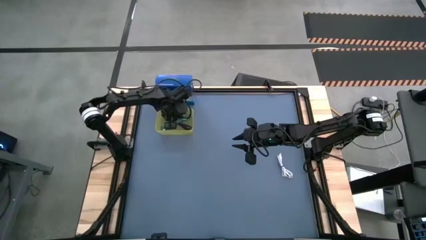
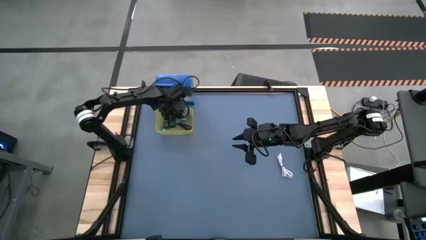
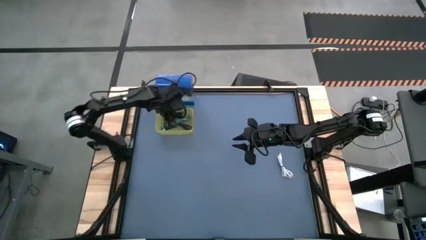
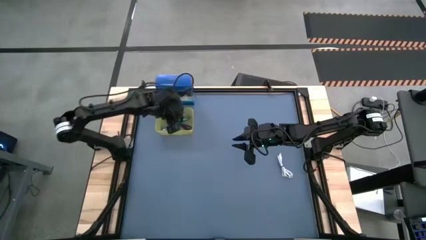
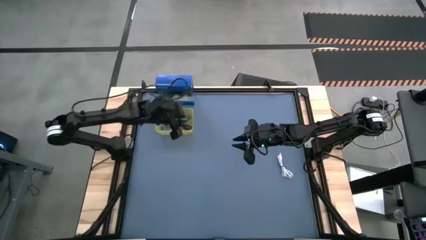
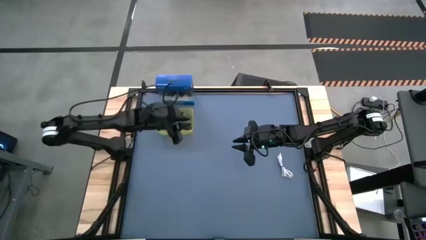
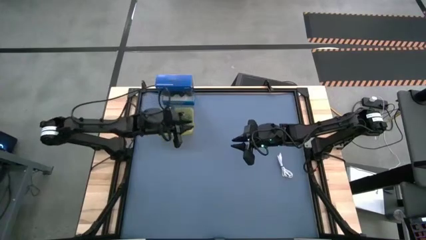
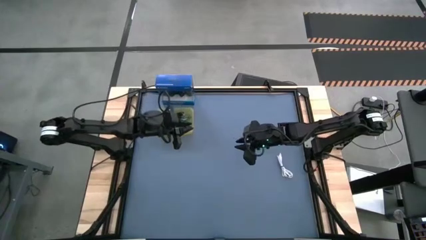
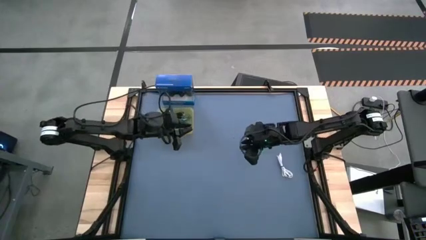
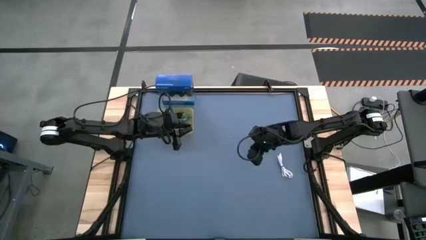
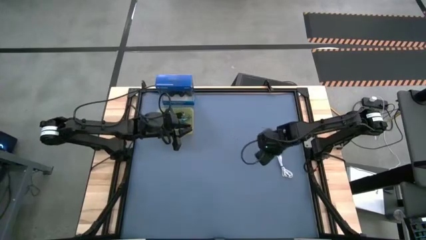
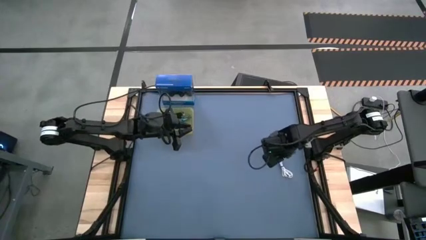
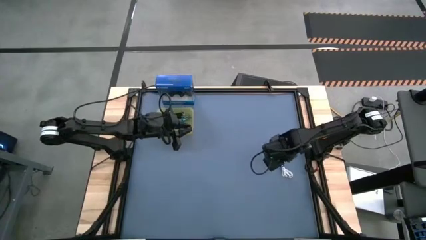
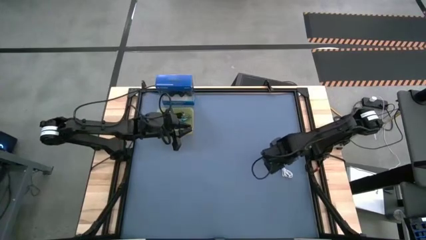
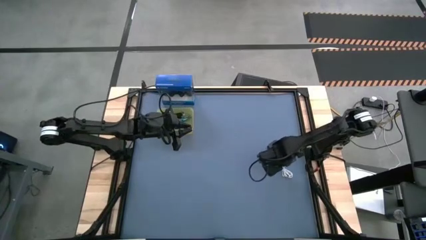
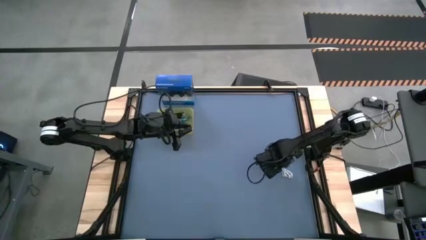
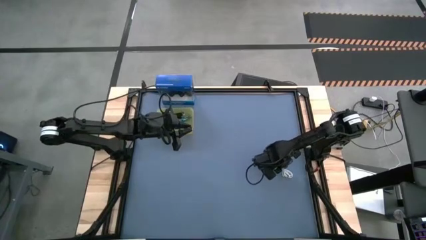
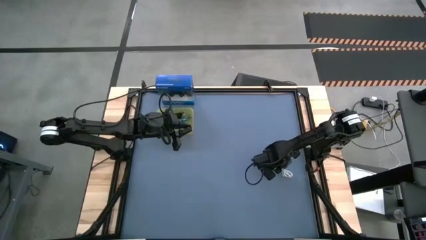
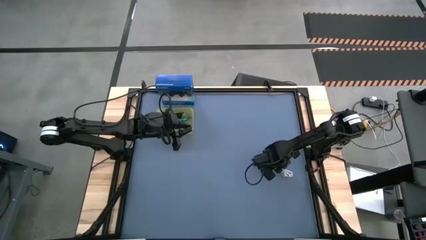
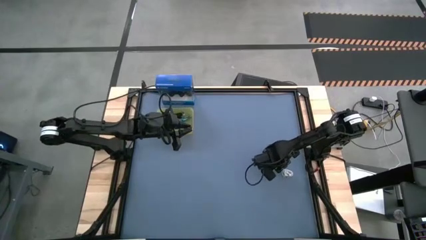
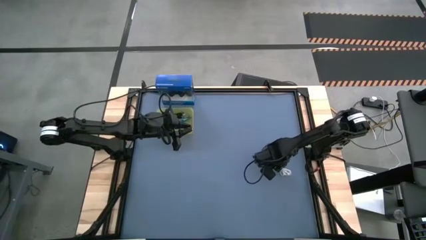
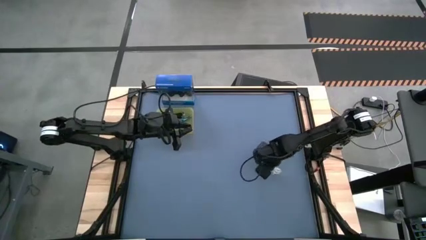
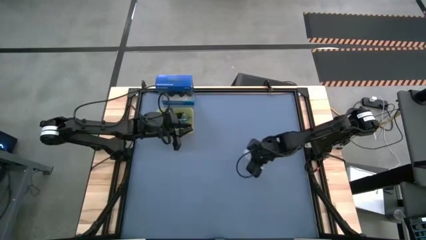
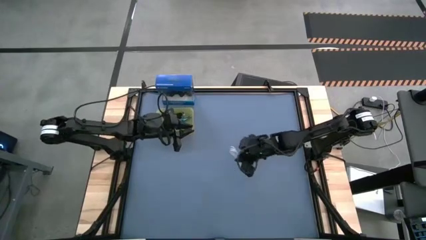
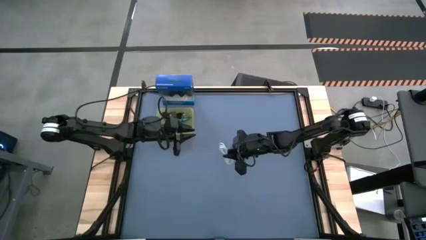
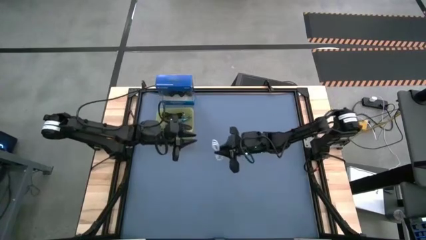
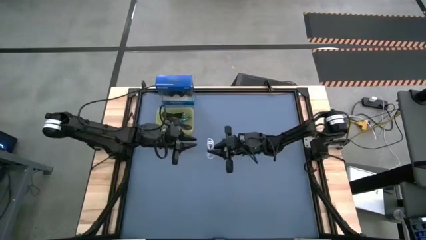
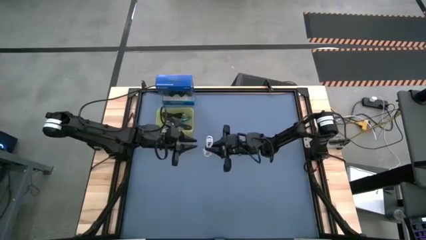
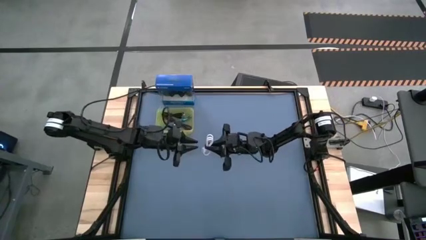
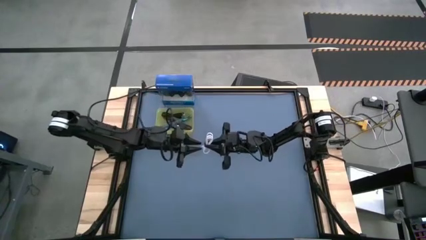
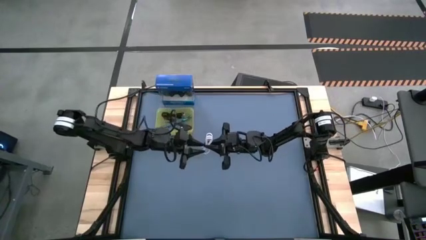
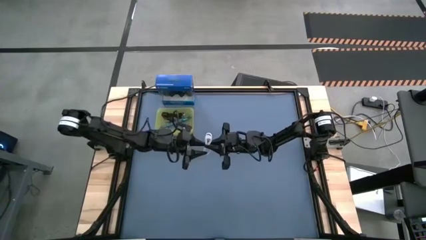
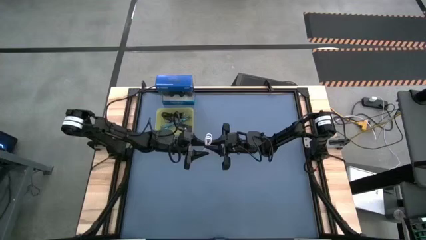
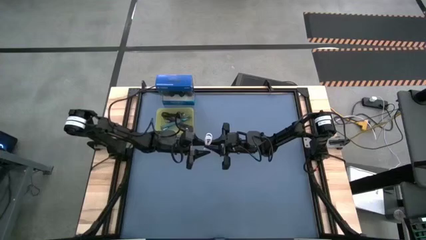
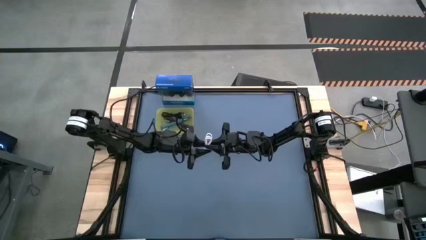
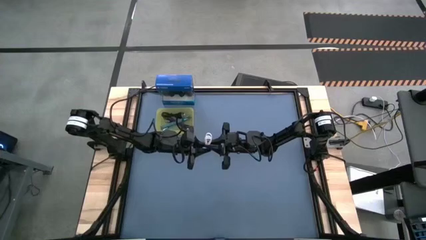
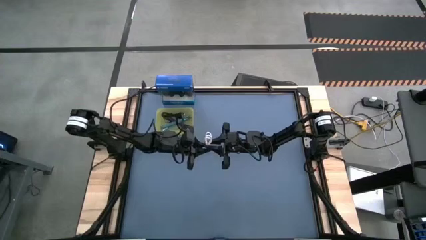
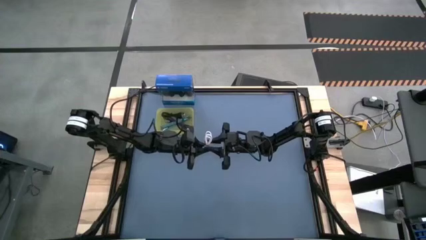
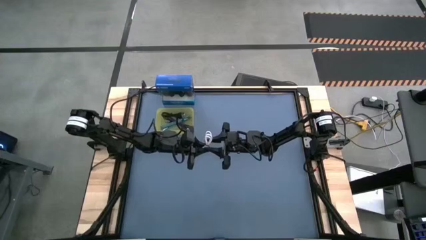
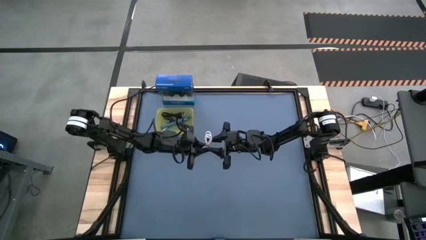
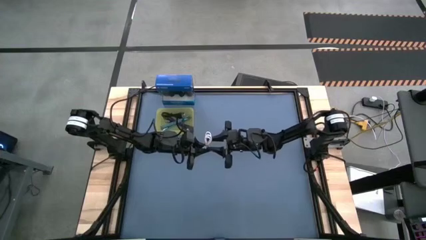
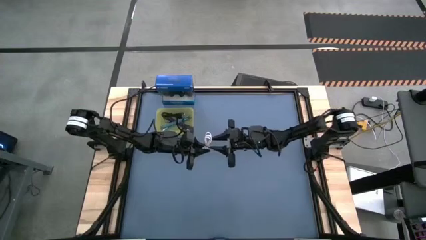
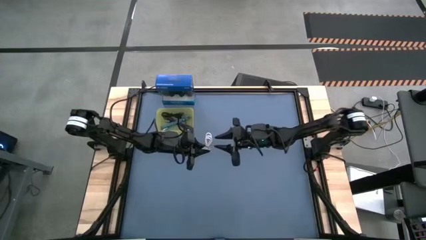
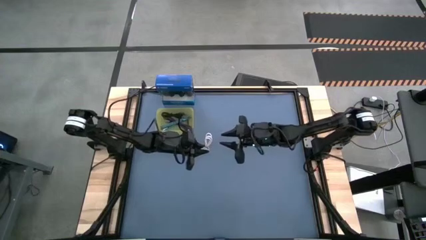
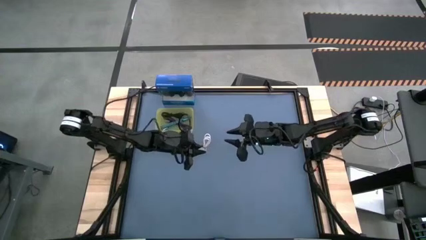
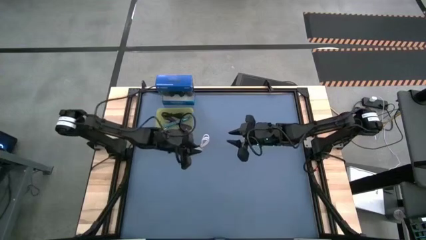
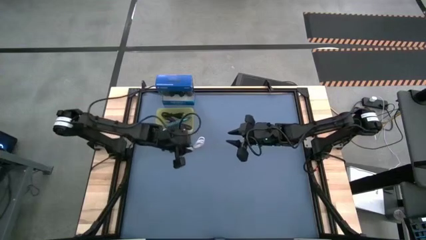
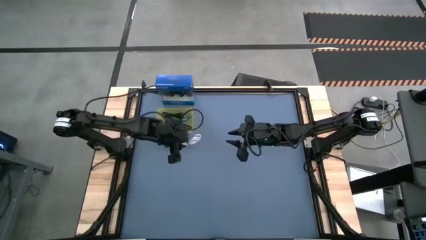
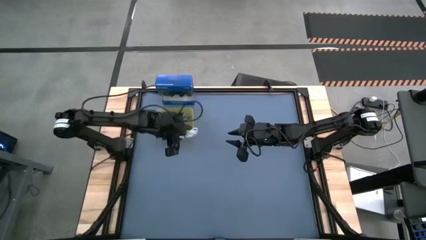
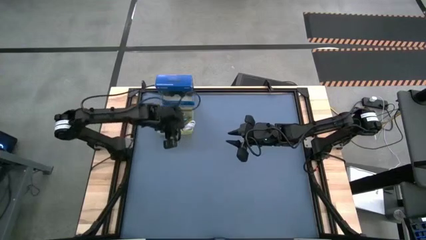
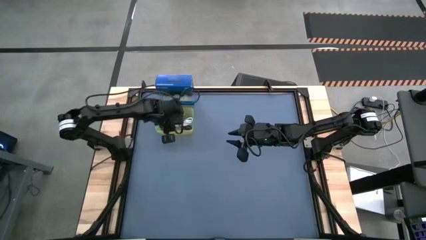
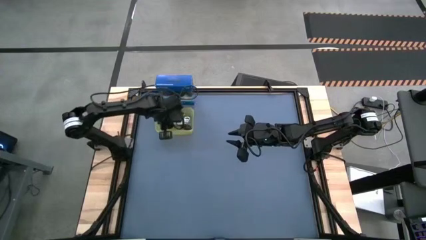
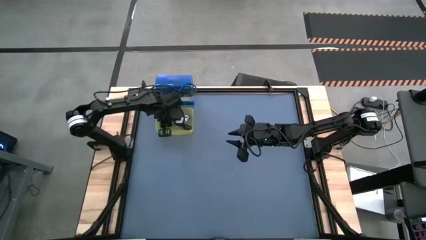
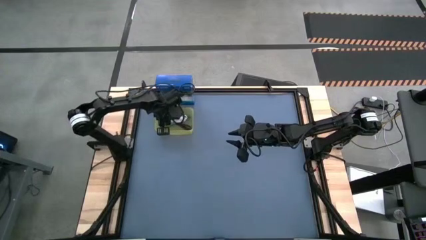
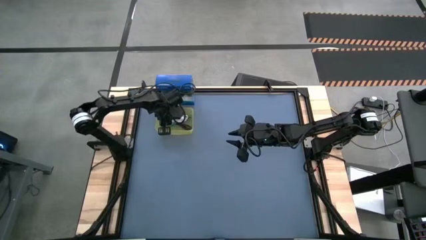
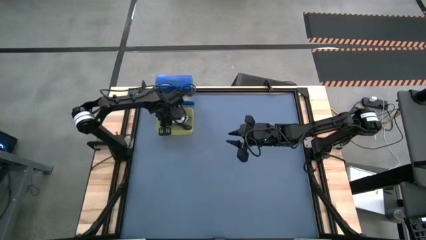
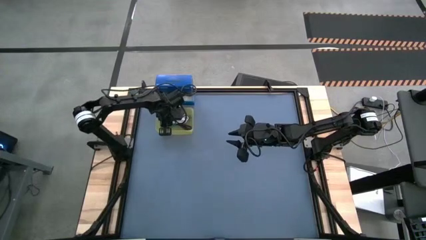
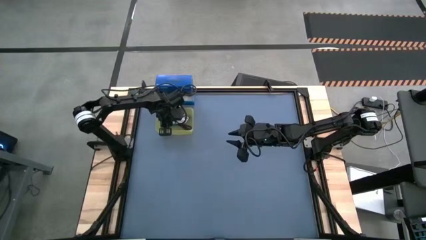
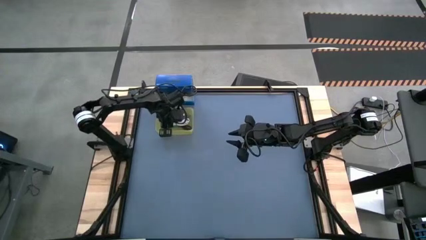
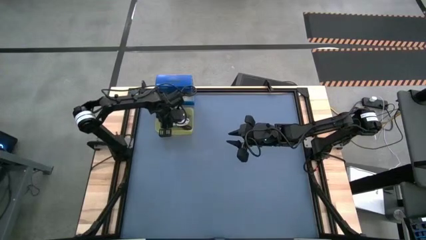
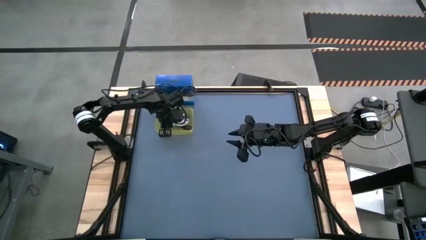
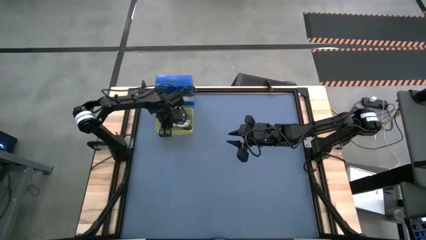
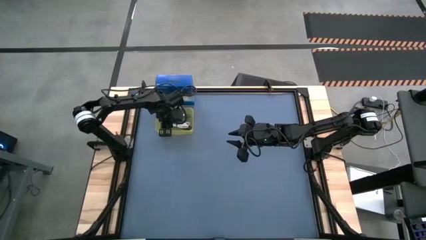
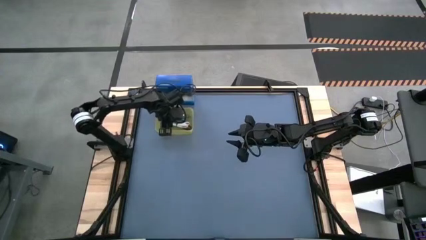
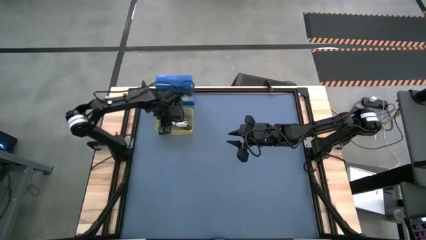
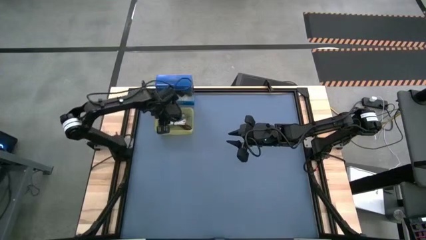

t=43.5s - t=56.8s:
Task: Pick and place USB-C Cables
Put the white charger cable into the yellow bin
